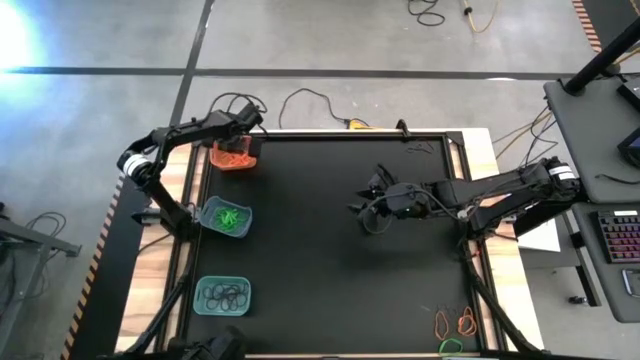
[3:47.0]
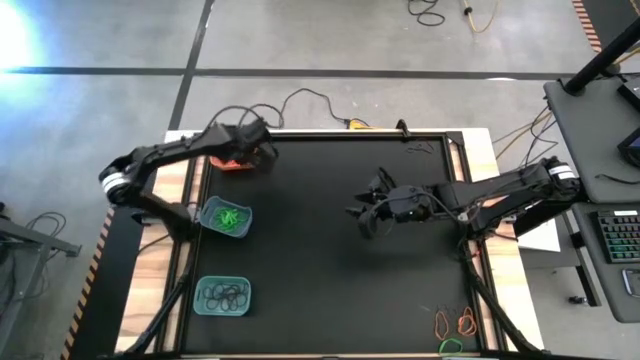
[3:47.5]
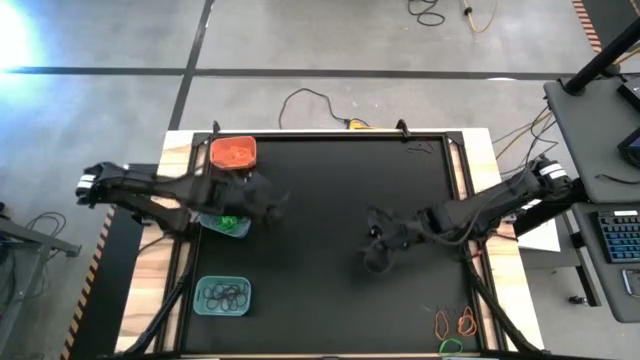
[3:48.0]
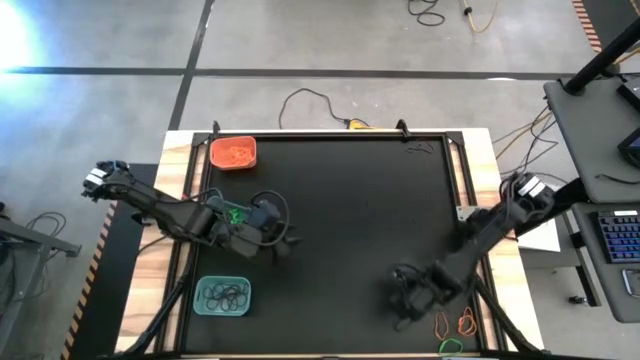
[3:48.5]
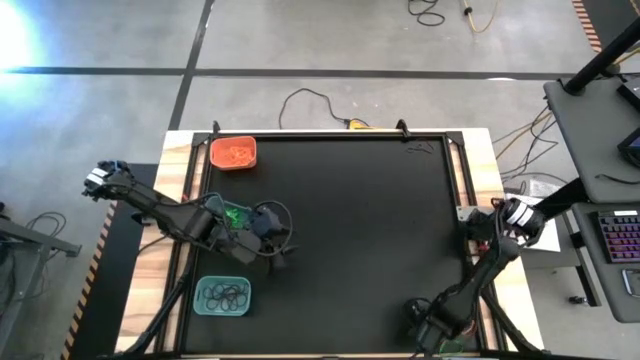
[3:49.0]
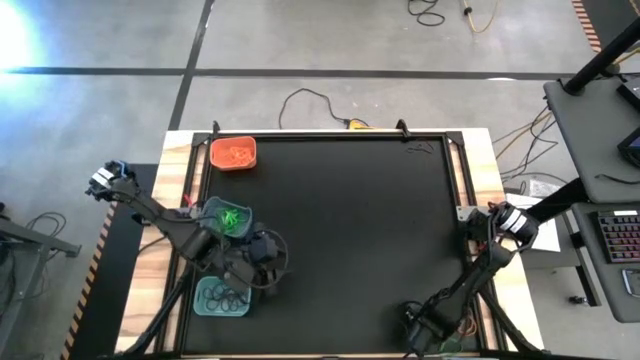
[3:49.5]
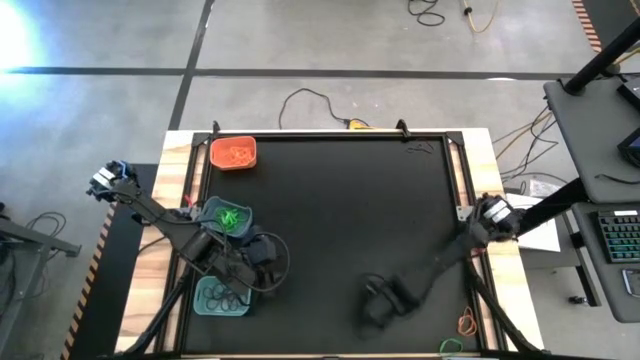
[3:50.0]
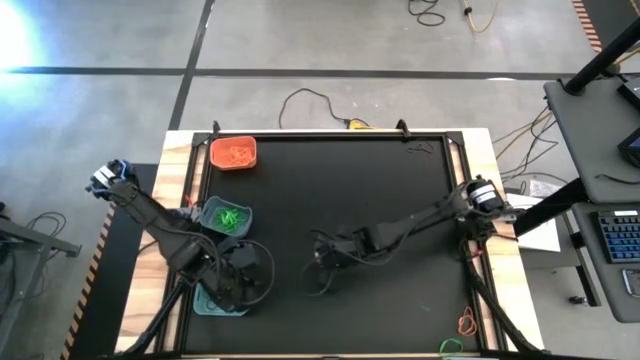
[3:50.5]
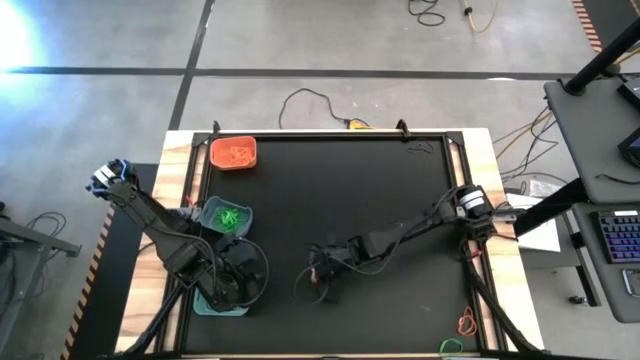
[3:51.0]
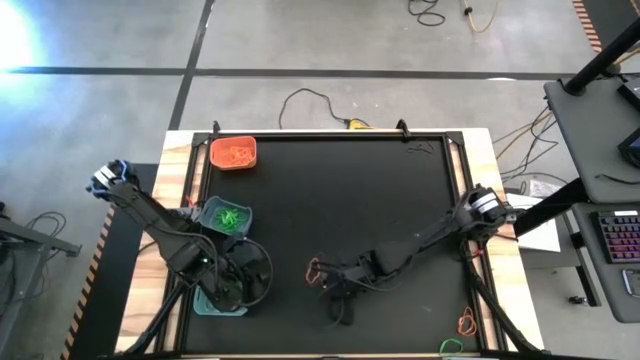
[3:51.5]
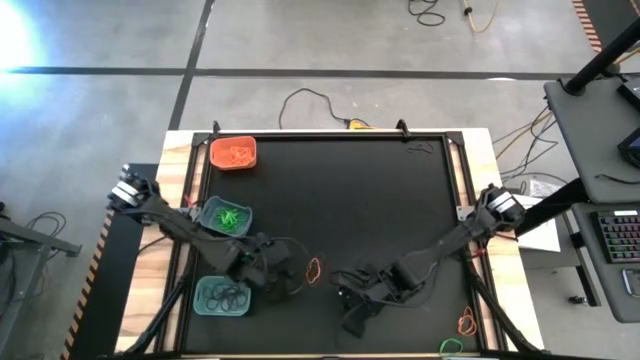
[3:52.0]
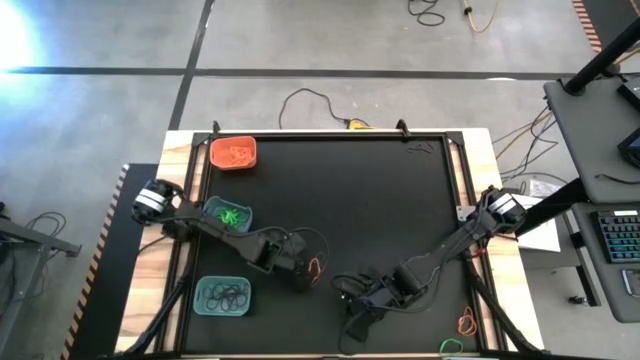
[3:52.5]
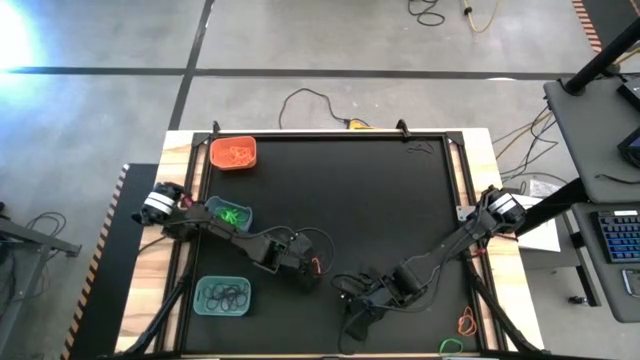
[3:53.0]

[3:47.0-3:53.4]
Task: Sort rubber bands into baskets
Put the purple rubber band into the green bin

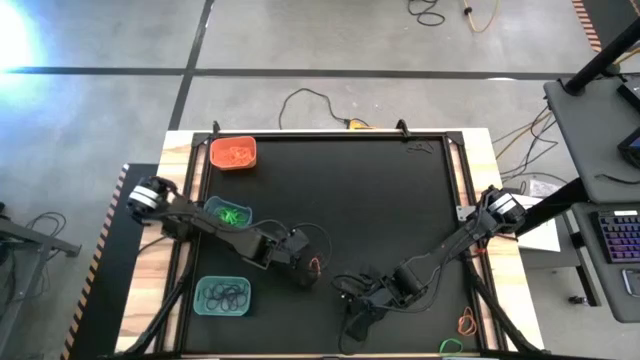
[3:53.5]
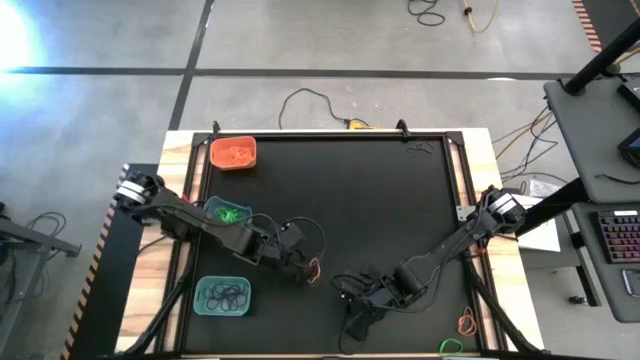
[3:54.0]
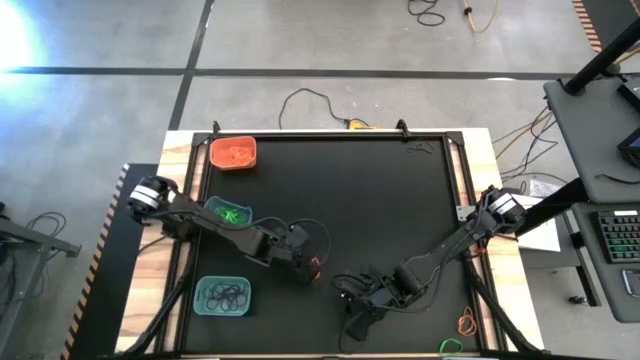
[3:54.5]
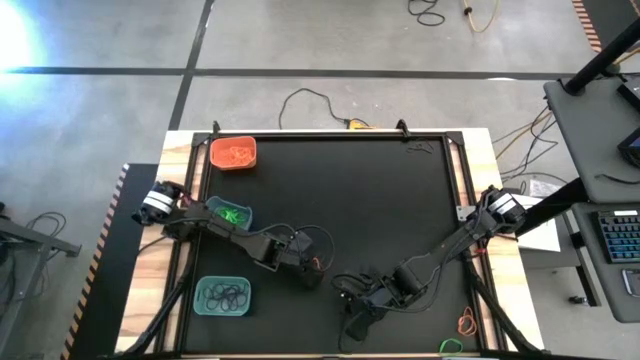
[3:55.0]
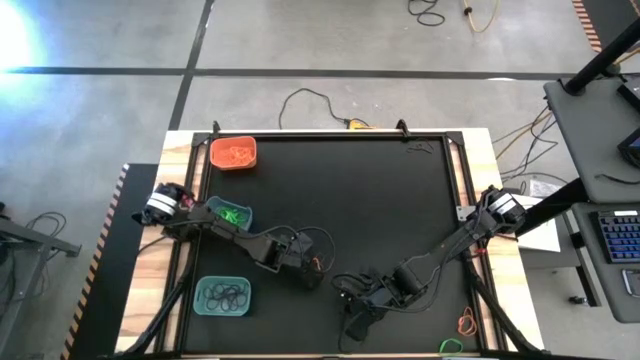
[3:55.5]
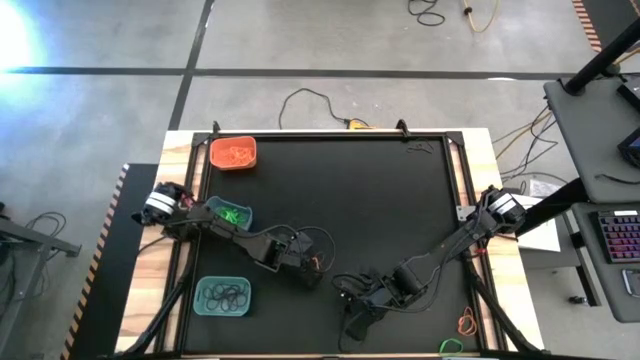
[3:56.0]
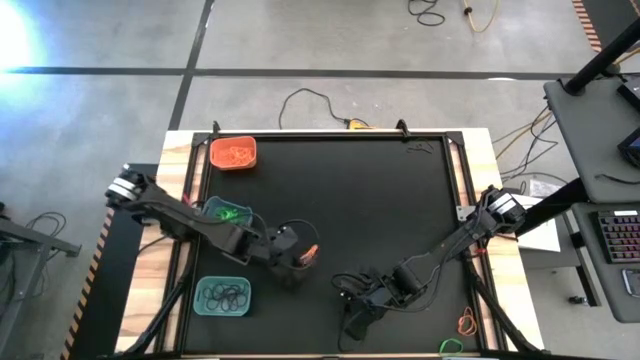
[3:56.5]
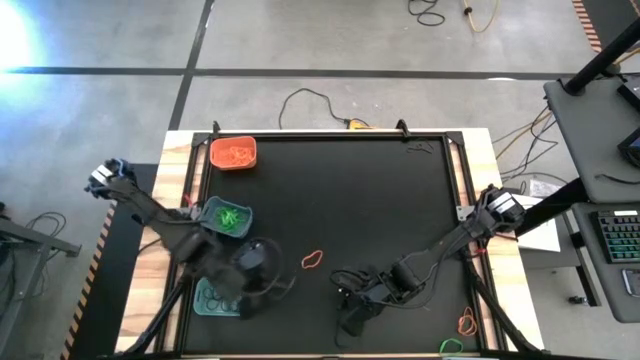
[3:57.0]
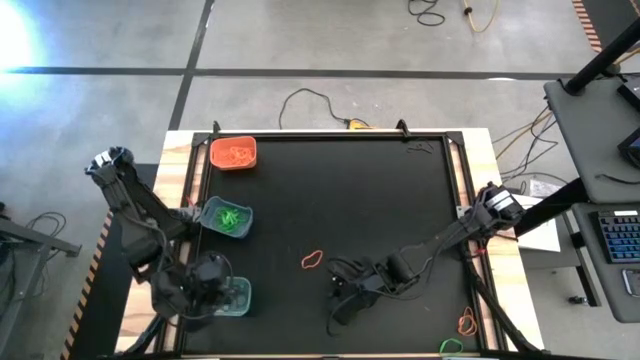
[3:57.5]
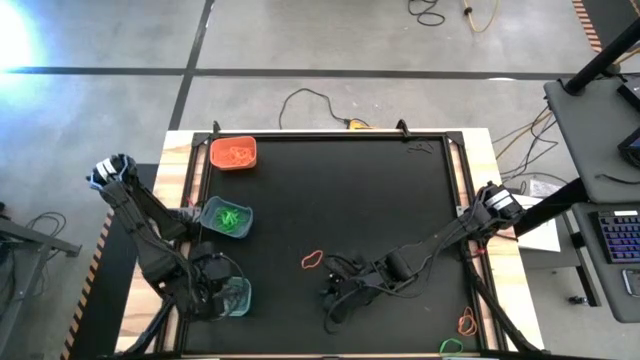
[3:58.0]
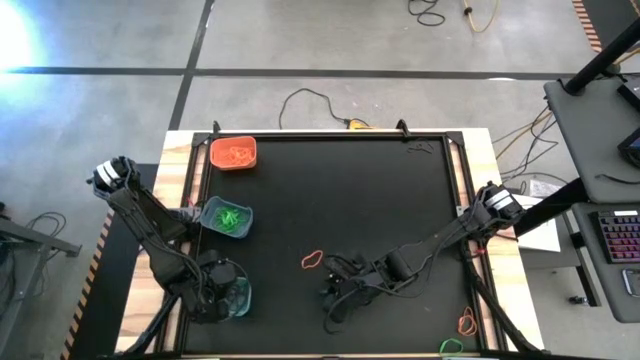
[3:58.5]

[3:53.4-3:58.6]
Put the purple rubber band into the green bin

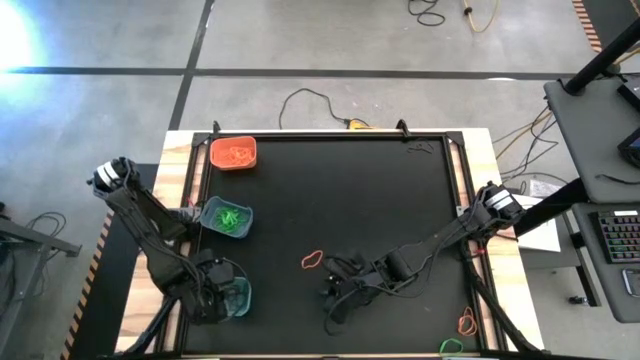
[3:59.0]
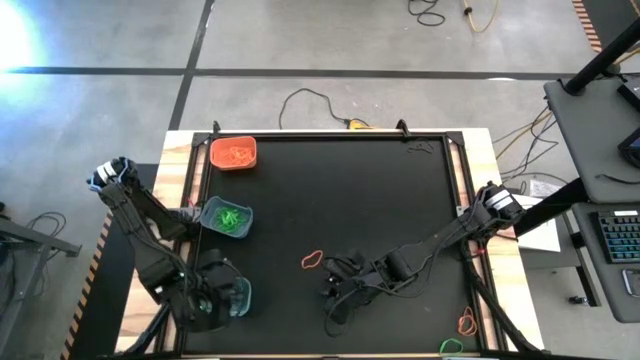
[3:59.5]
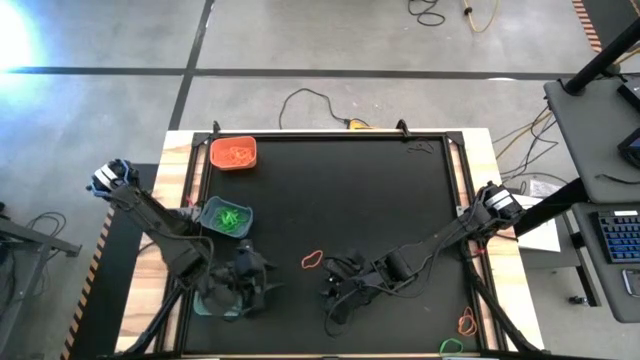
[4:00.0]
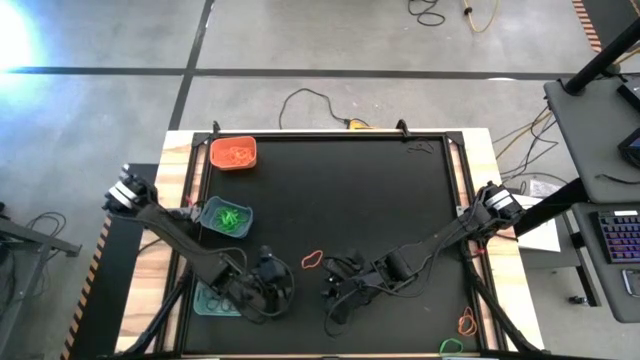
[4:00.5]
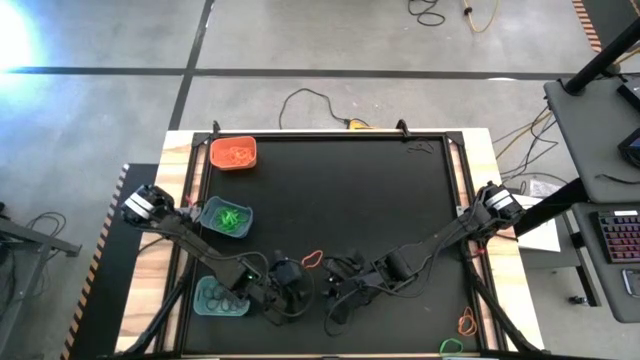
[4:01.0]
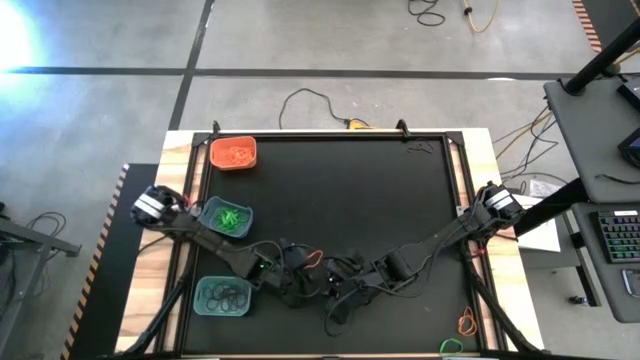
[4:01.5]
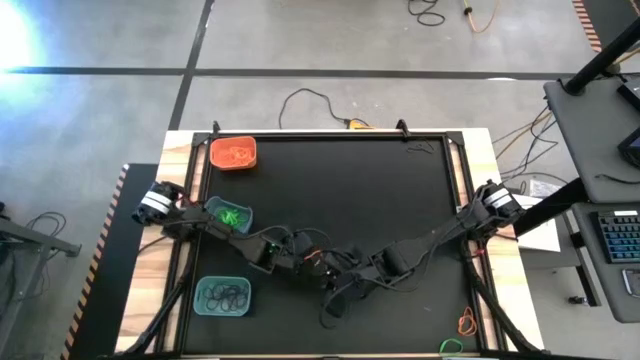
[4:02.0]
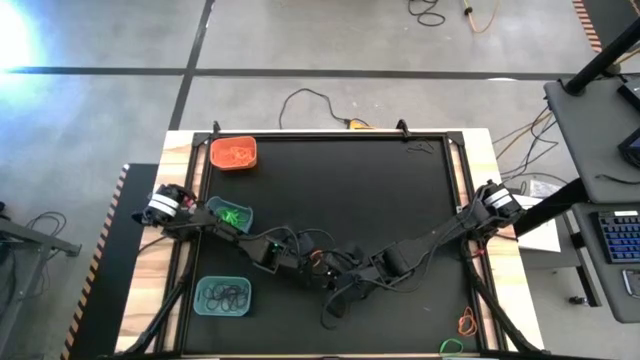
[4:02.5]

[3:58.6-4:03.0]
Put the orange rubber band into the orange bin

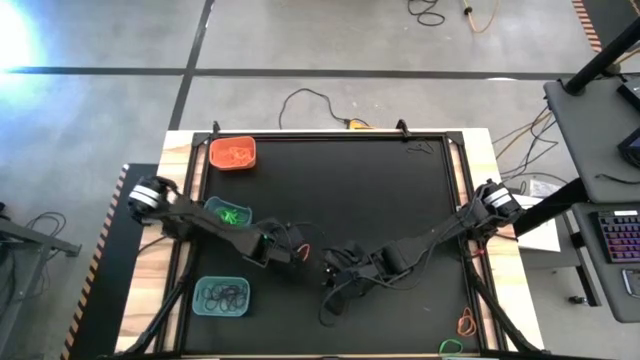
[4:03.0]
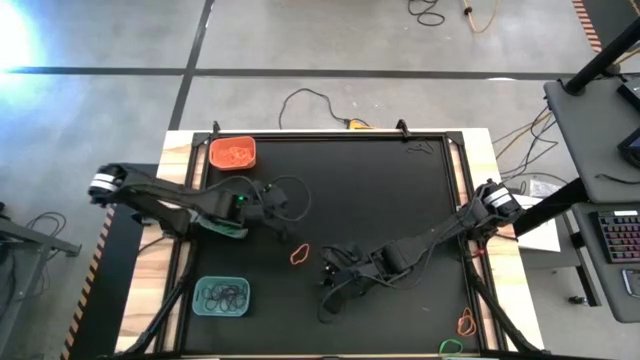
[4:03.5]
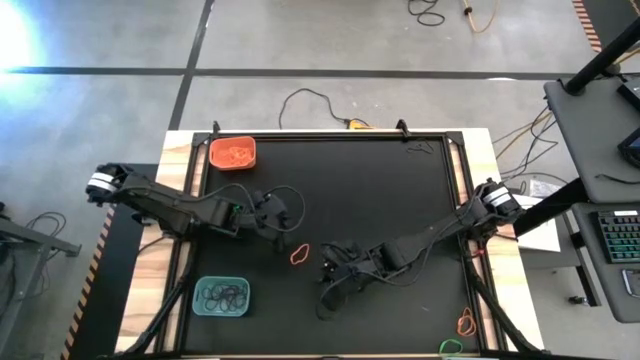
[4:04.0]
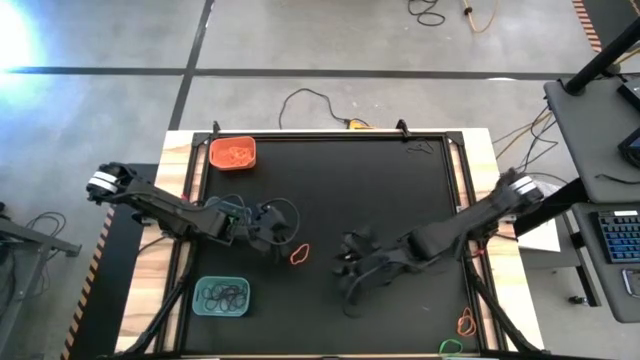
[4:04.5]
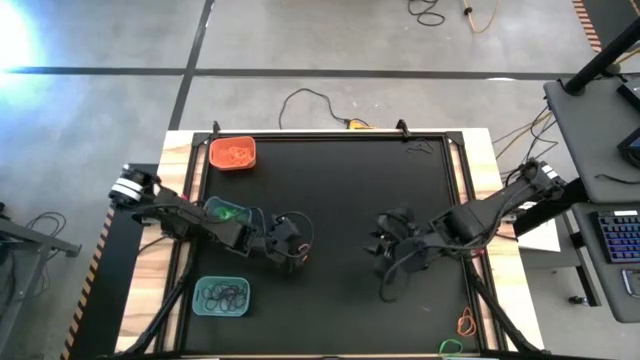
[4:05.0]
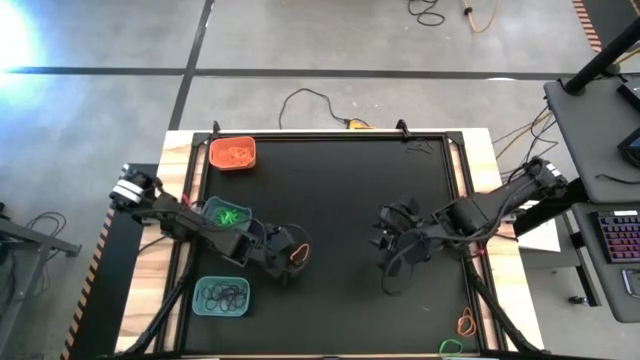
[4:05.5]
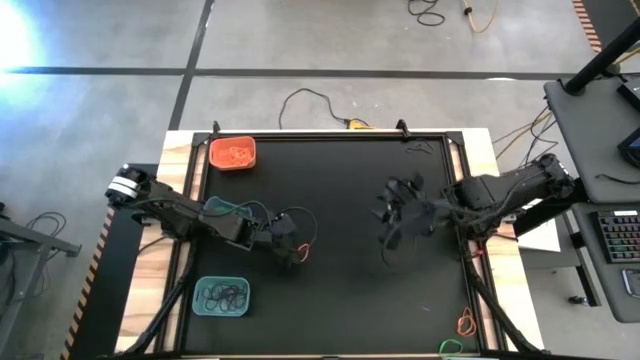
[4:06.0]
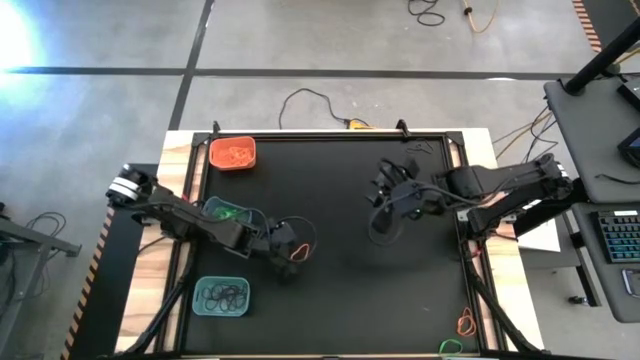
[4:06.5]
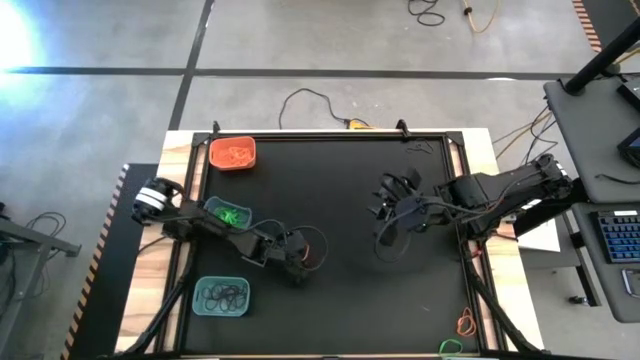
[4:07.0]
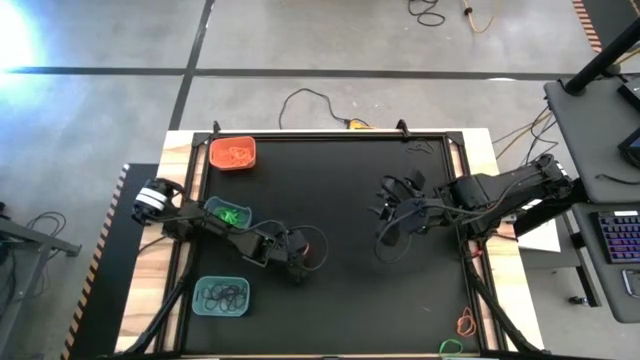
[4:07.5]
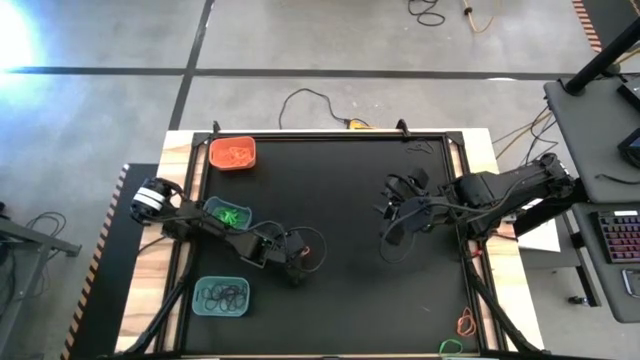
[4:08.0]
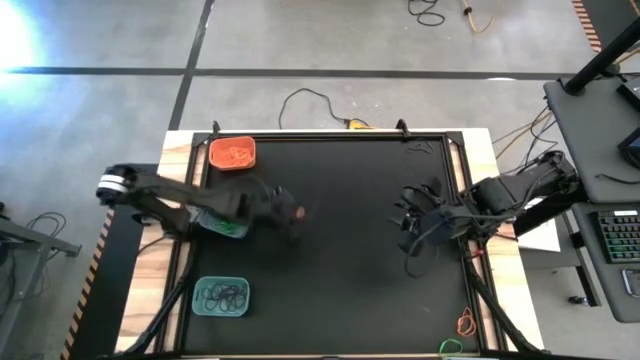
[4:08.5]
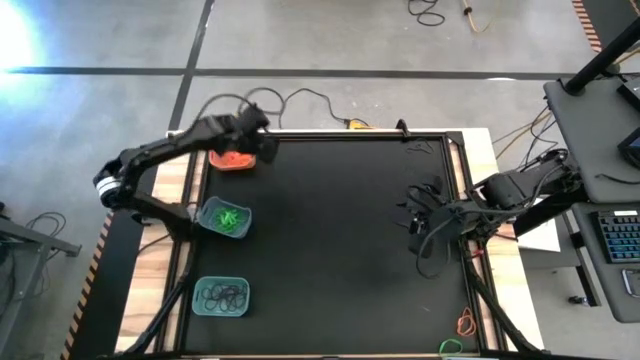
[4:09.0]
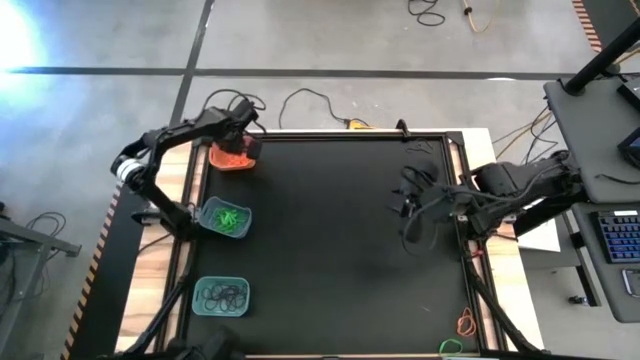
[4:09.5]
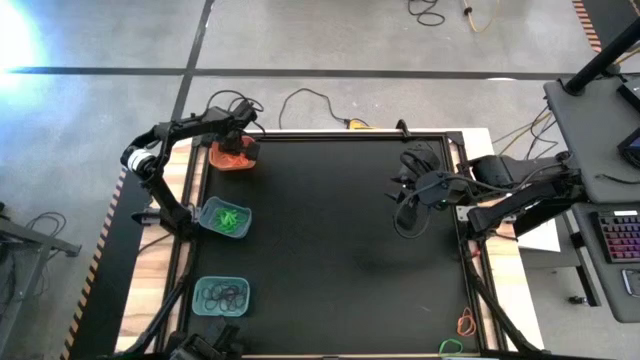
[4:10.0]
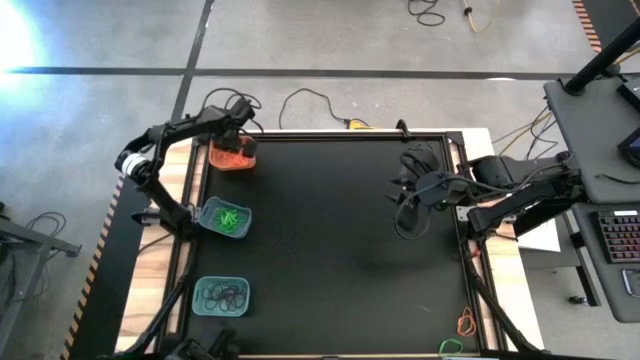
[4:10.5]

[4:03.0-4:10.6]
Put the orange rubber band into the orange bin
